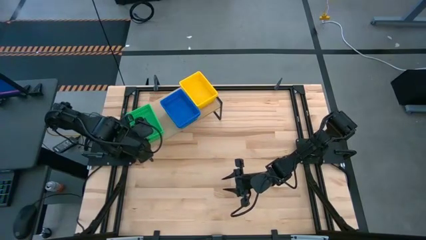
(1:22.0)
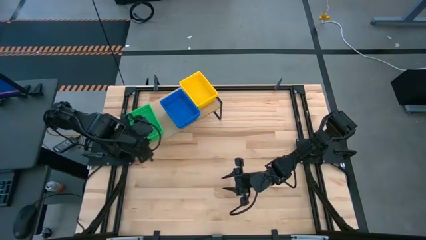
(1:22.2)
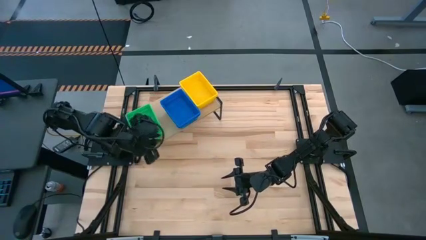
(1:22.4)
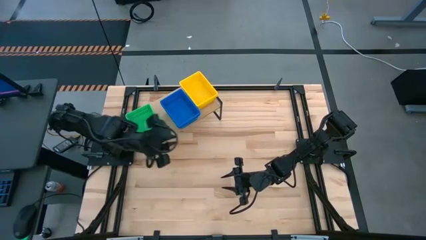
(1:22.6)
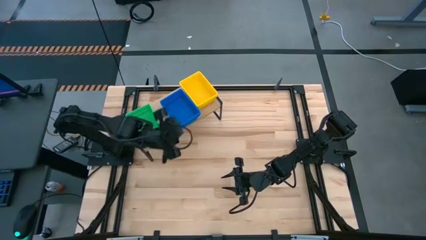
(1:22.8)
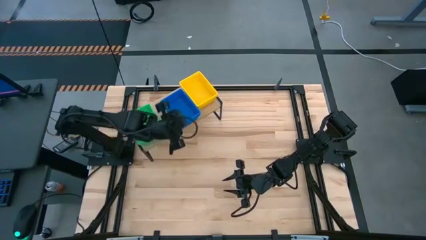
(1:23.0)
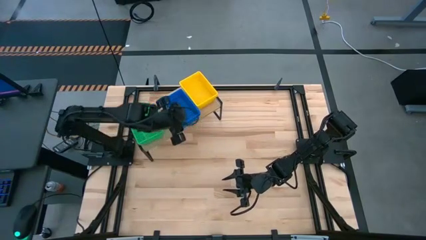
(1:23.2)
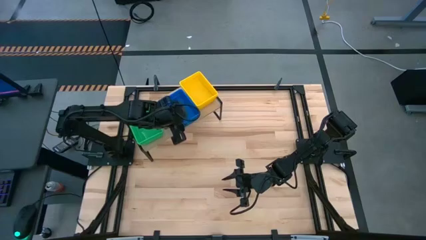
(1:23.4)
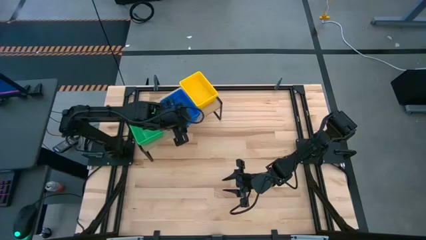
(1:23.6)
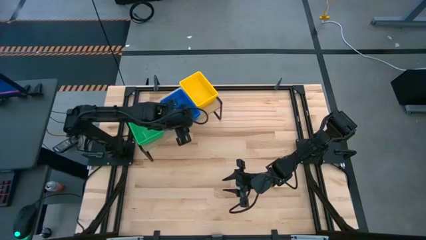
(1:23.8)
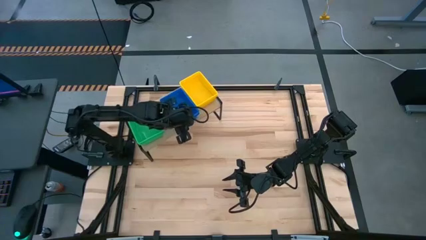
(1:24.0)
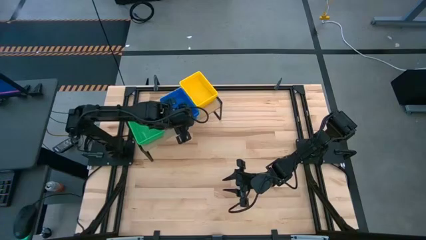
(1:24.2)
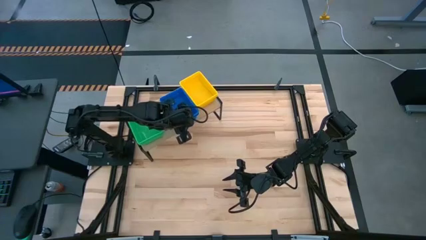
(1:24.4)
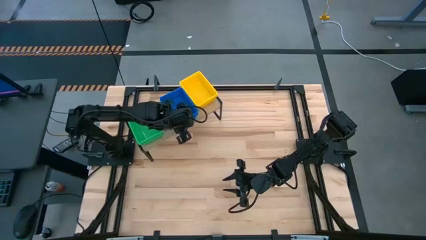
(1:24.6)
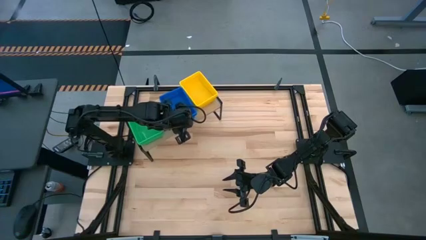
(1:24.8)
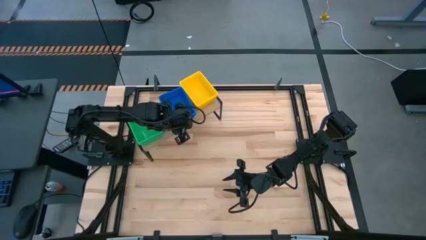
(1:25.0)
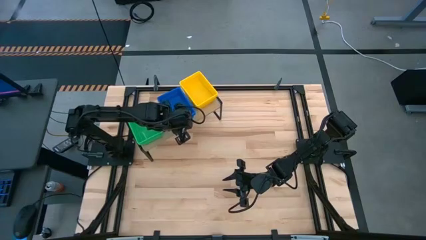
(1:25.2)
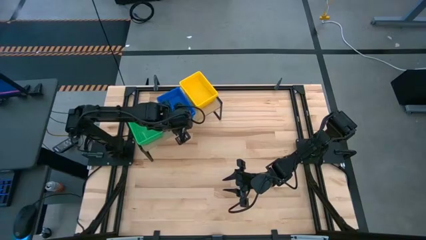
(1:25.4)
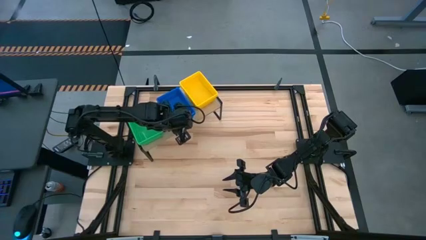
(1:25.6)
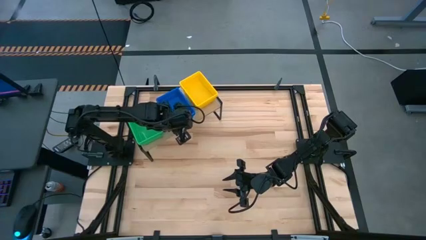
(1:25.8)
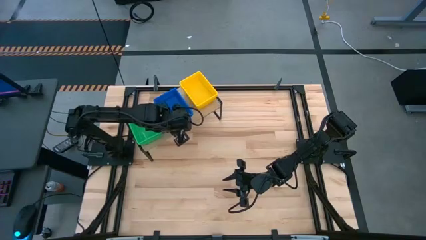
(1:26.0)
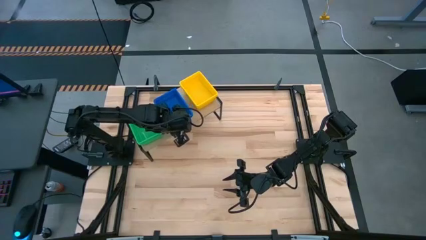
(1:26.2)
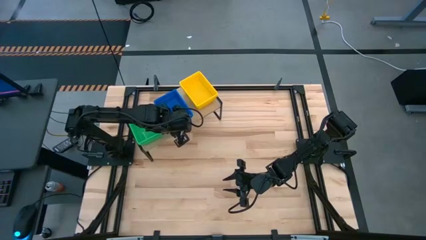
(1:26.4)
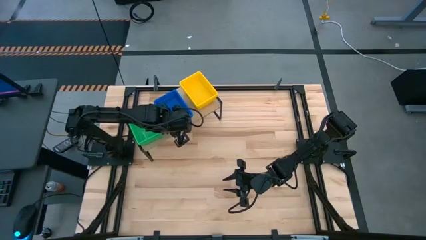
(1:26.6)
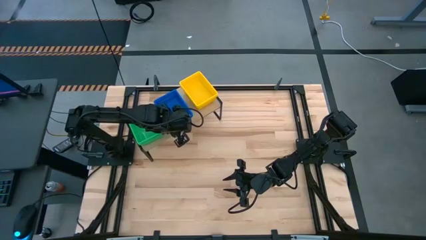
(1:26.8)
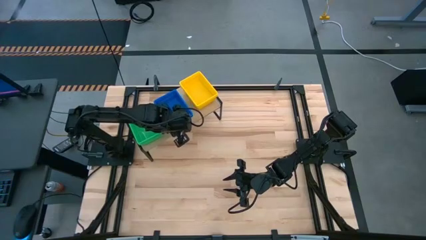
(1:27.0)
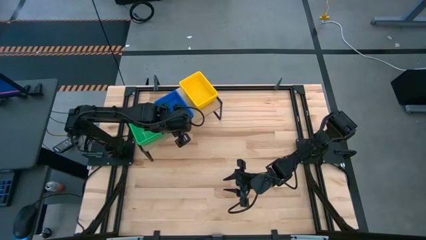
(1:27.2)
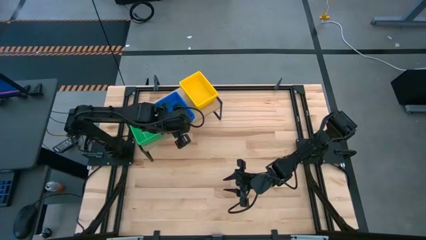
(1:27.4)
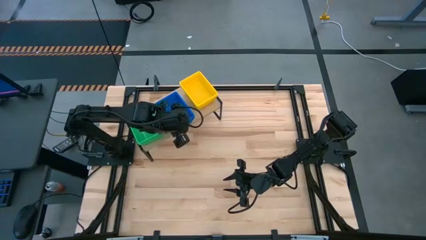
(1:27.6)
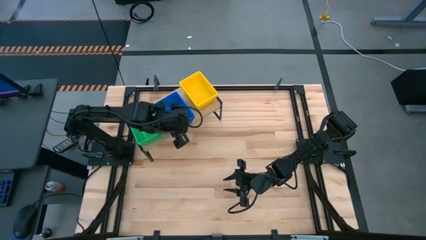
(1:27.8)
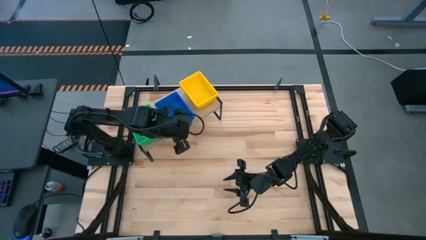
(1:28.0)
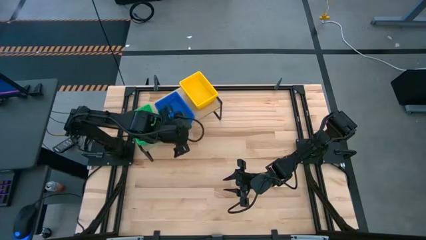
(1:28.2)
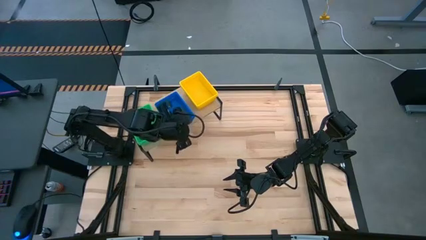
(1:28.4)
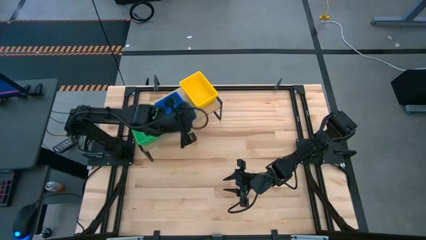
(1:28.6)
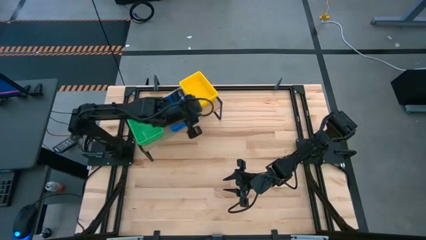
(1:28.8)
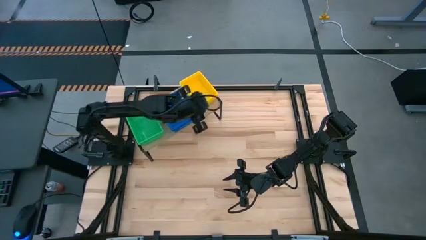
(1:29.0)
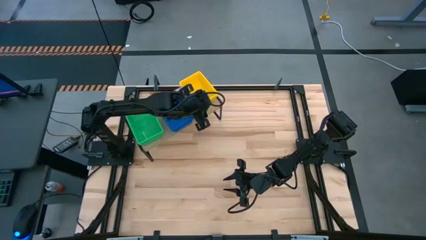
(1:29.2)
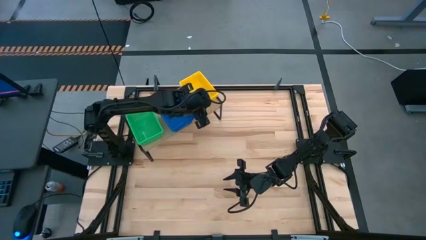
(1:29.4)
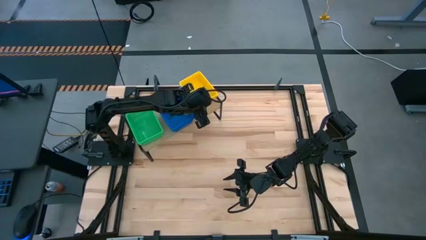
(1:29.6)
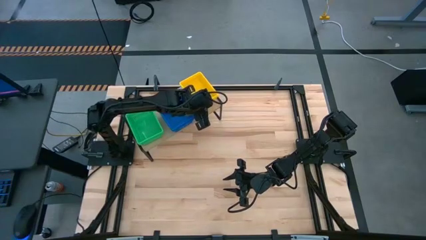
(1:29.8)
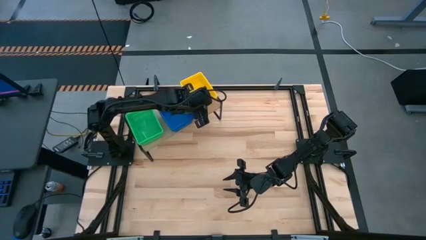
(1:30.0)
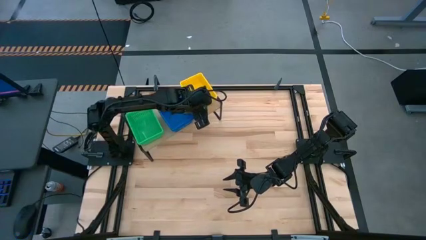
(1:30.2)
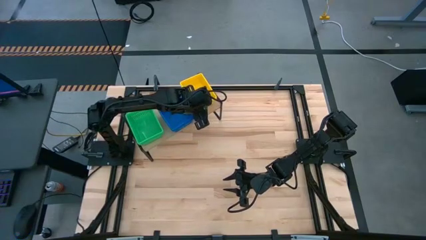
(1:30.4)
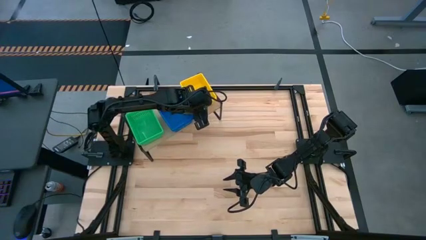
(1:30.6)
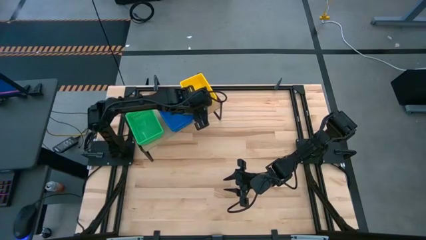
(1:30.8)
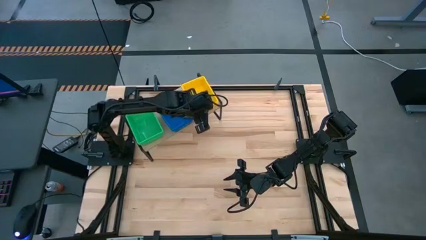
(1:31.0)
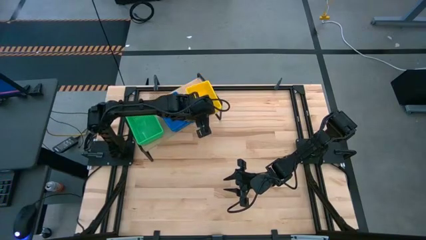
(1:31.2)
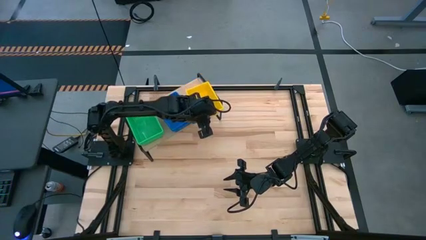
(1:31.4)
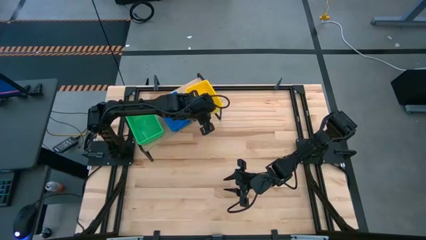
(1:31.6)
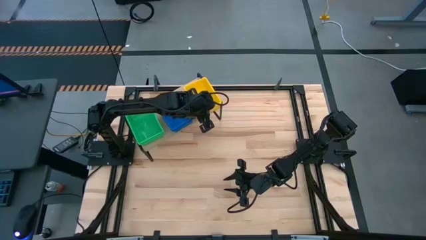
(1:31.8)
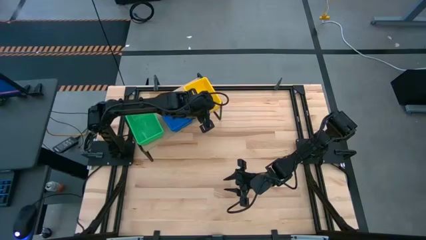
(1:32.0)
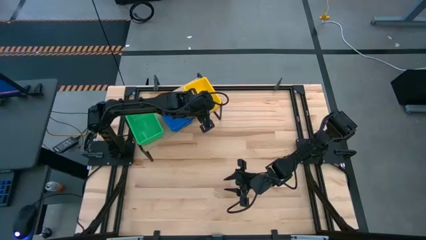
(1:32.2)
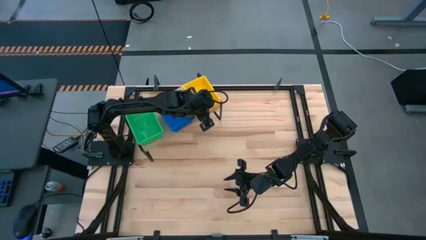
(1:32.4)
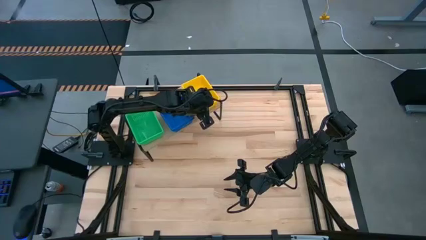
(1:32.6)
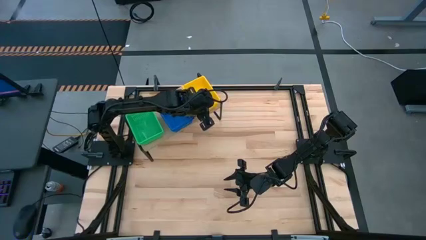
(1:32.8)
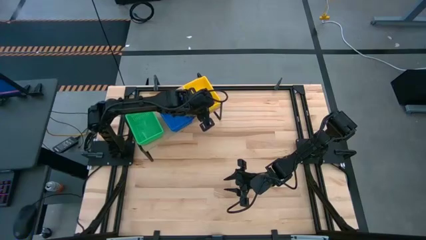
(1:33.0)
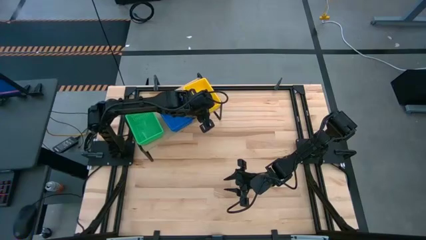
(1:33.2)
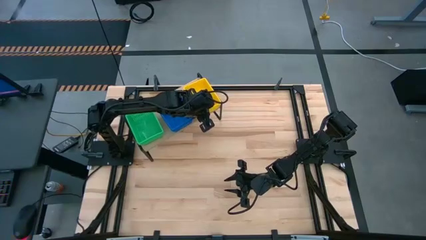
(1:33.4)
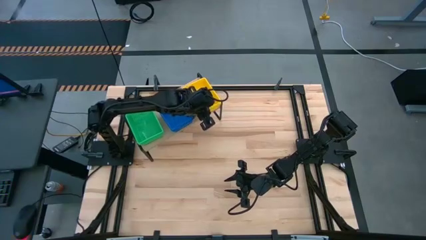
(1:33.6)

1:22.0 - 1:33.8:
Task: Stack baskets on shelf by color
Adjust the baskets on the shelf
